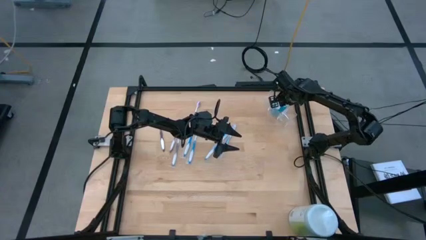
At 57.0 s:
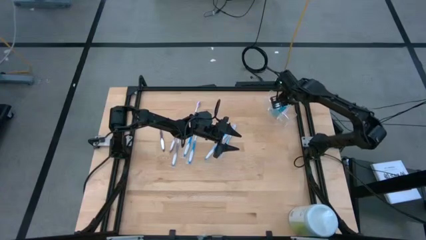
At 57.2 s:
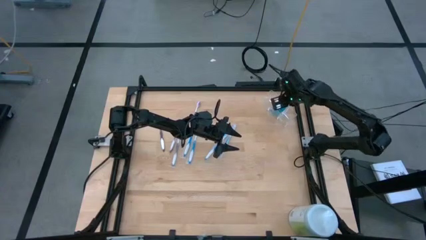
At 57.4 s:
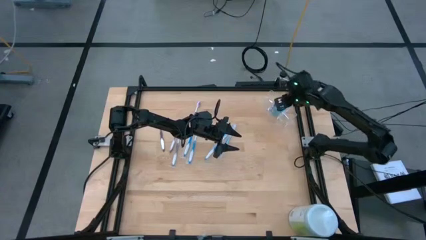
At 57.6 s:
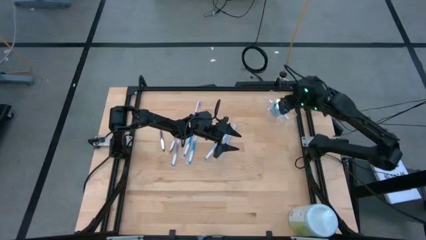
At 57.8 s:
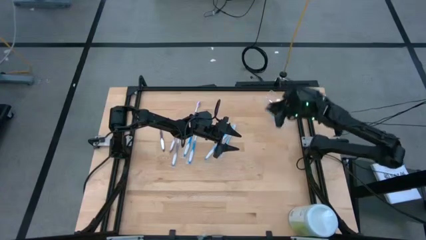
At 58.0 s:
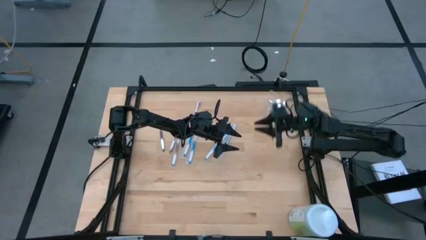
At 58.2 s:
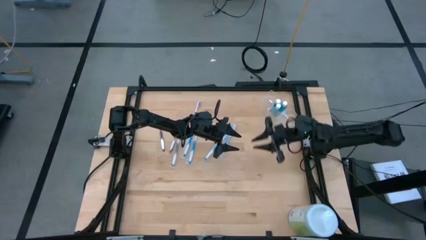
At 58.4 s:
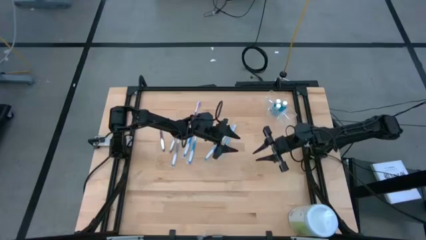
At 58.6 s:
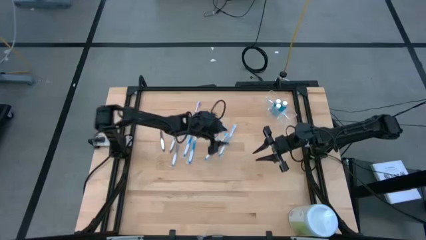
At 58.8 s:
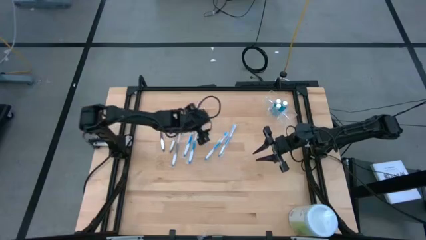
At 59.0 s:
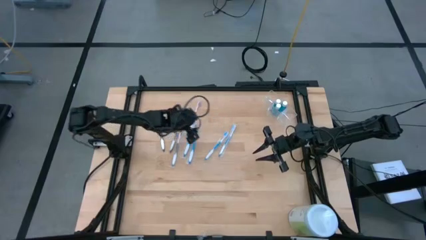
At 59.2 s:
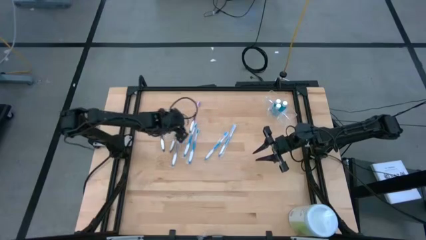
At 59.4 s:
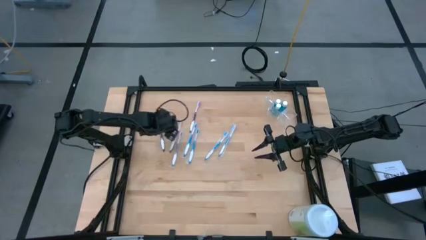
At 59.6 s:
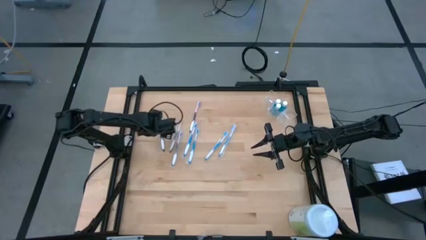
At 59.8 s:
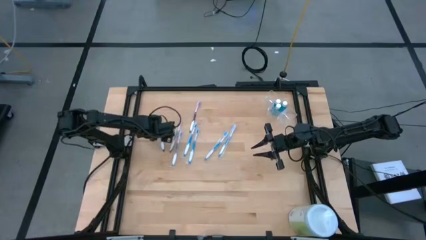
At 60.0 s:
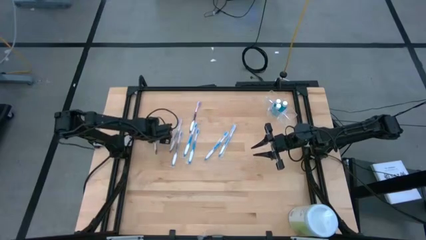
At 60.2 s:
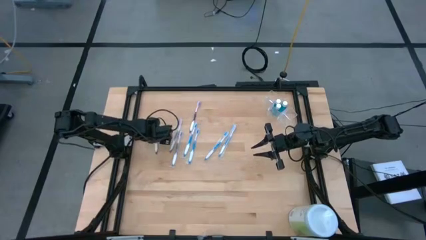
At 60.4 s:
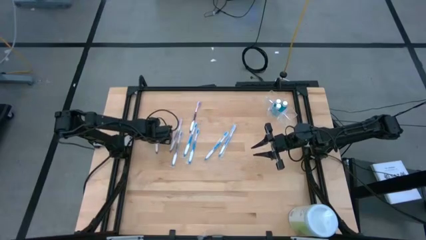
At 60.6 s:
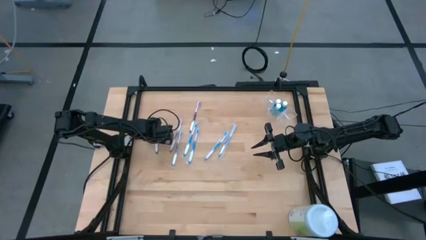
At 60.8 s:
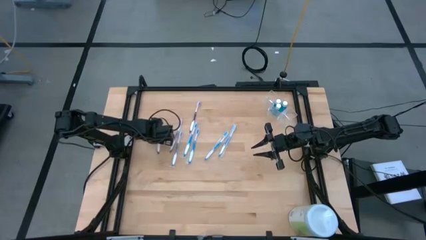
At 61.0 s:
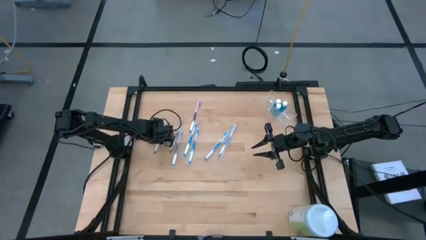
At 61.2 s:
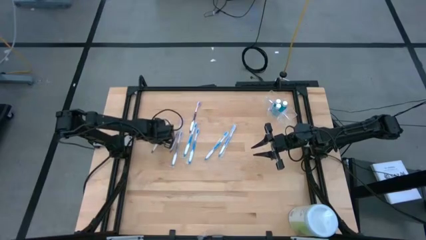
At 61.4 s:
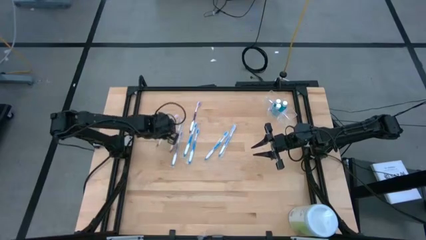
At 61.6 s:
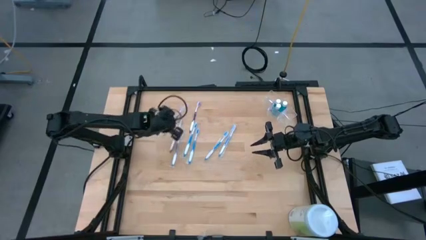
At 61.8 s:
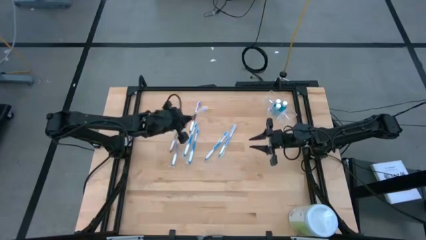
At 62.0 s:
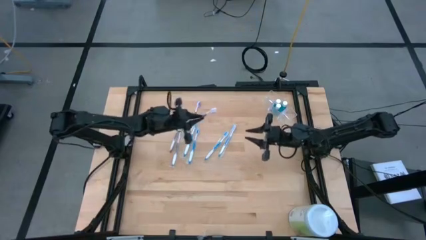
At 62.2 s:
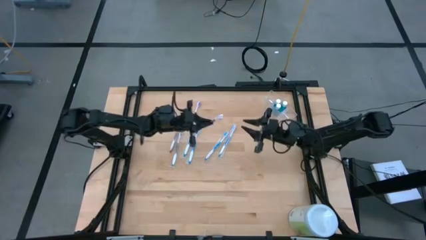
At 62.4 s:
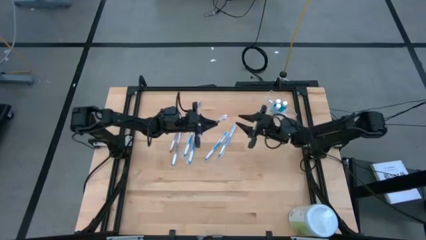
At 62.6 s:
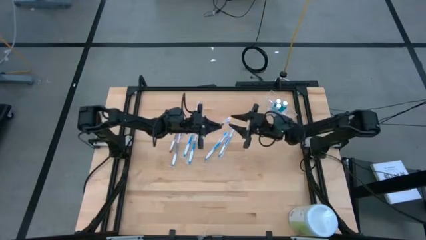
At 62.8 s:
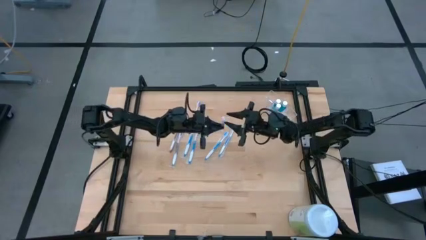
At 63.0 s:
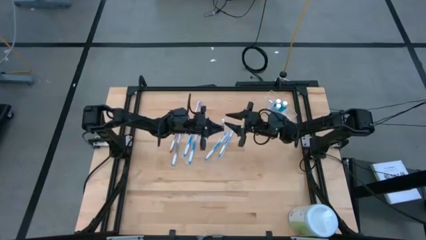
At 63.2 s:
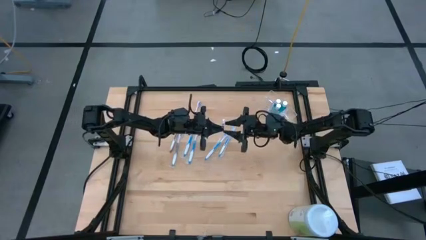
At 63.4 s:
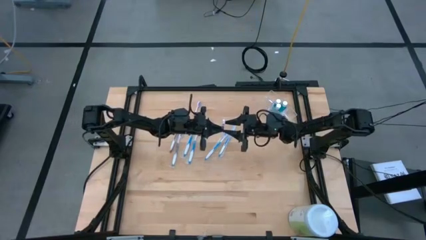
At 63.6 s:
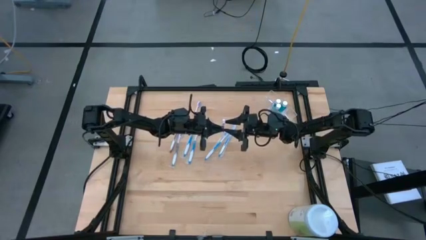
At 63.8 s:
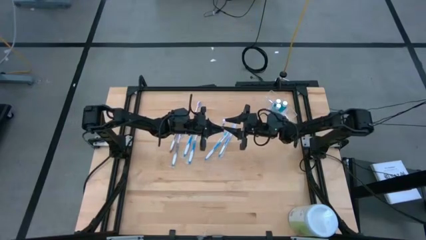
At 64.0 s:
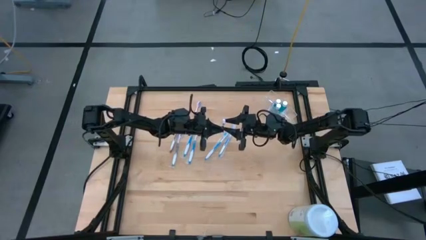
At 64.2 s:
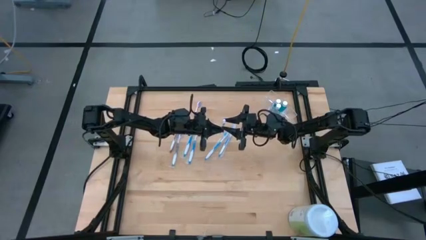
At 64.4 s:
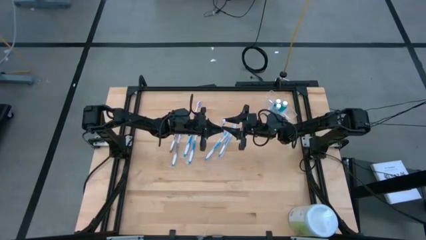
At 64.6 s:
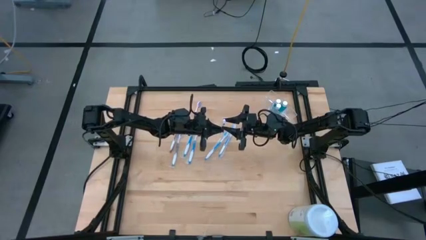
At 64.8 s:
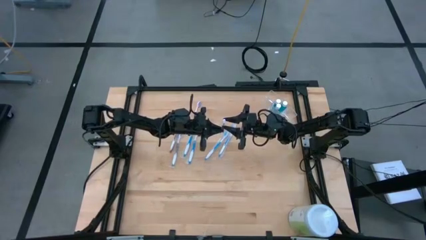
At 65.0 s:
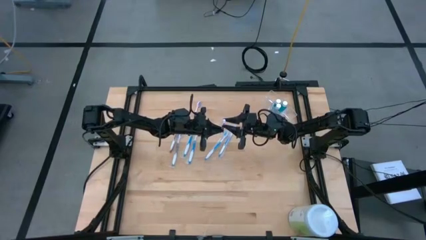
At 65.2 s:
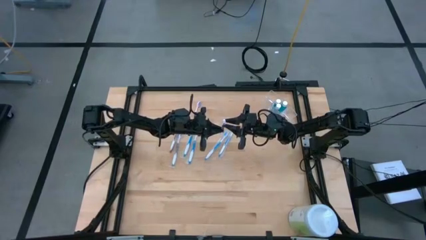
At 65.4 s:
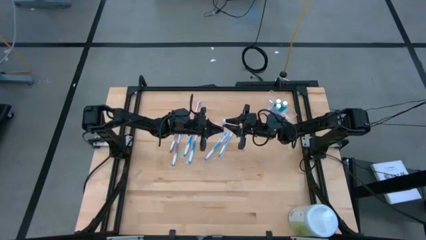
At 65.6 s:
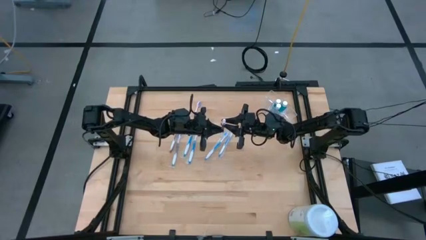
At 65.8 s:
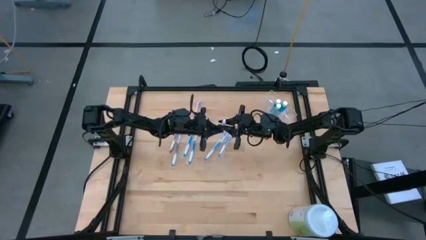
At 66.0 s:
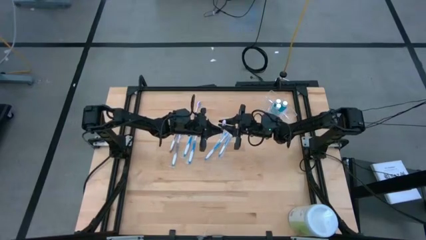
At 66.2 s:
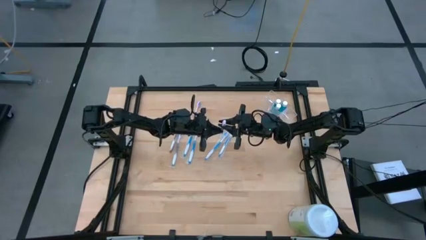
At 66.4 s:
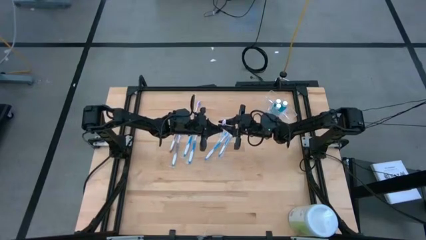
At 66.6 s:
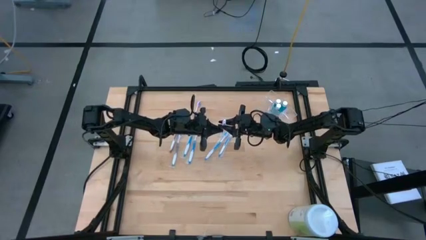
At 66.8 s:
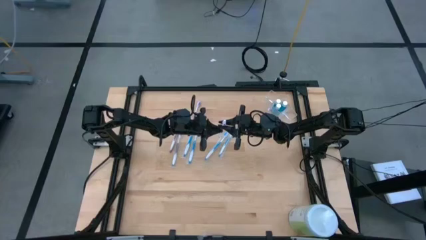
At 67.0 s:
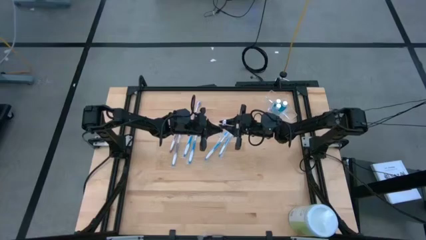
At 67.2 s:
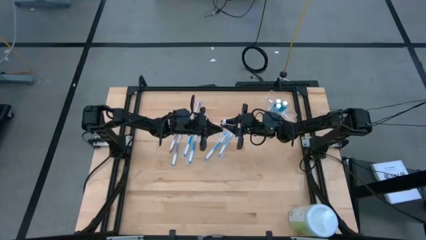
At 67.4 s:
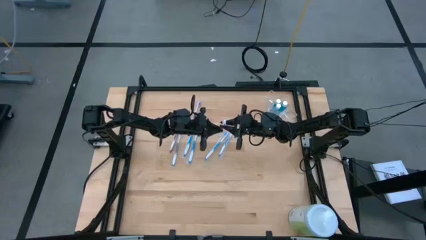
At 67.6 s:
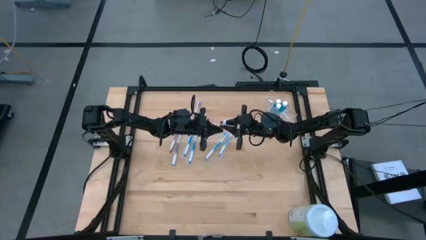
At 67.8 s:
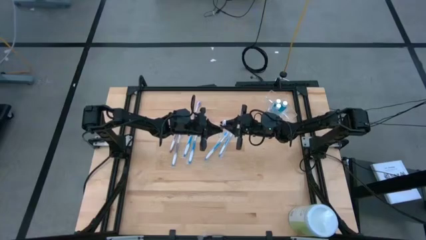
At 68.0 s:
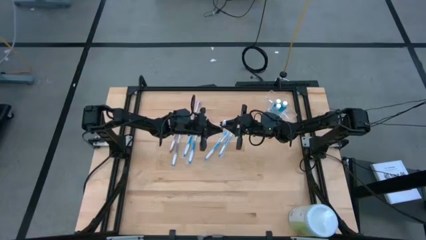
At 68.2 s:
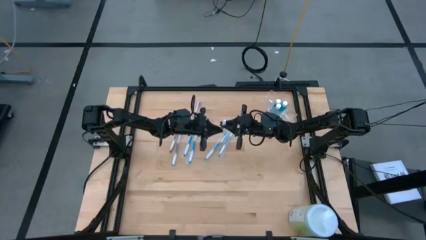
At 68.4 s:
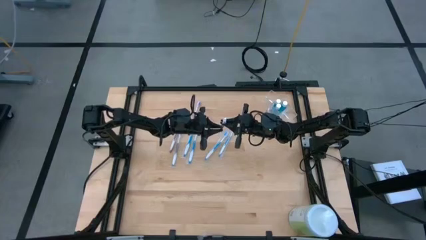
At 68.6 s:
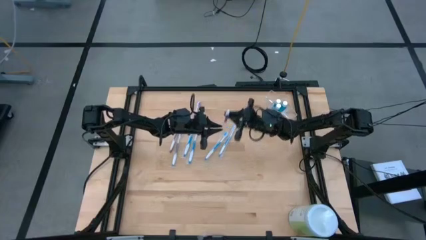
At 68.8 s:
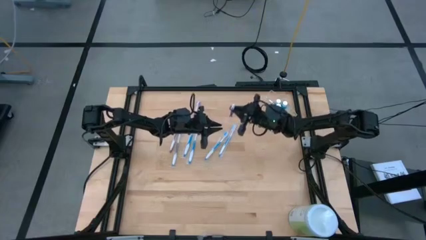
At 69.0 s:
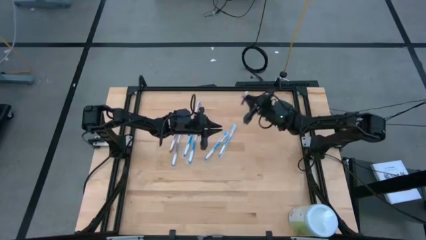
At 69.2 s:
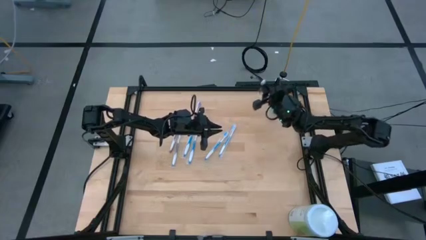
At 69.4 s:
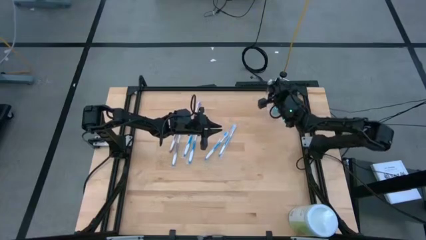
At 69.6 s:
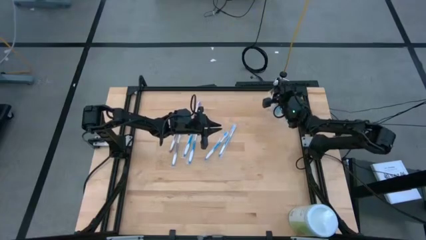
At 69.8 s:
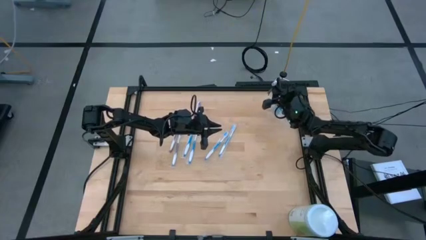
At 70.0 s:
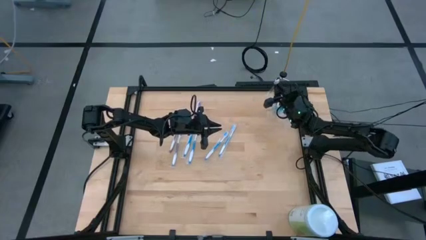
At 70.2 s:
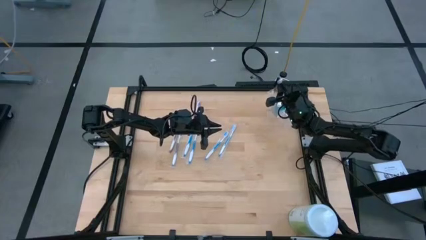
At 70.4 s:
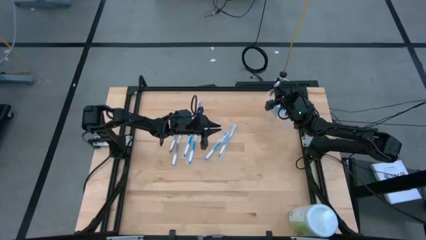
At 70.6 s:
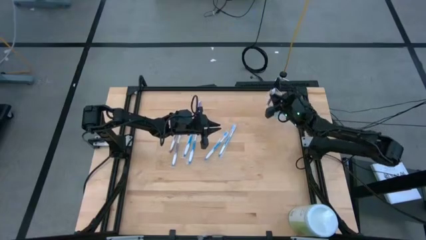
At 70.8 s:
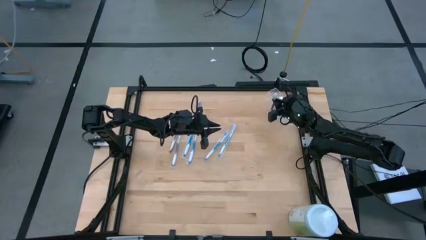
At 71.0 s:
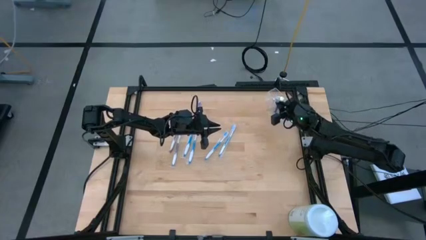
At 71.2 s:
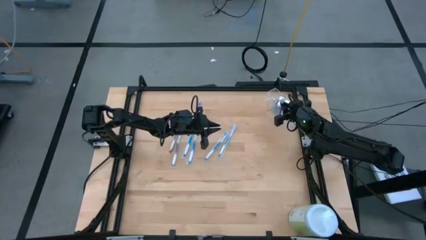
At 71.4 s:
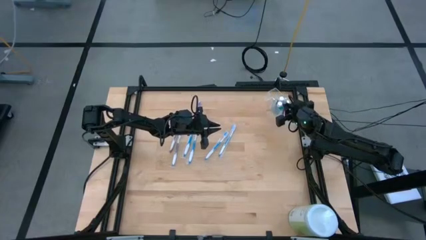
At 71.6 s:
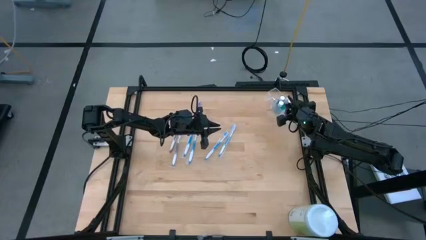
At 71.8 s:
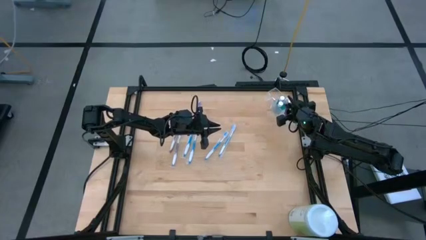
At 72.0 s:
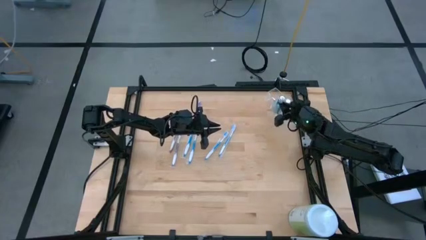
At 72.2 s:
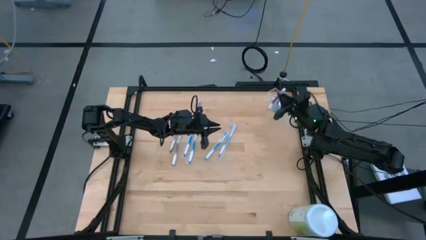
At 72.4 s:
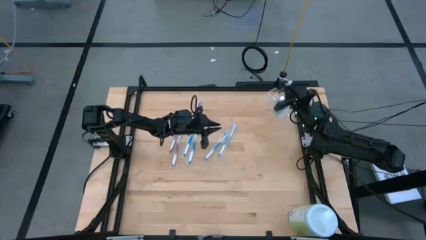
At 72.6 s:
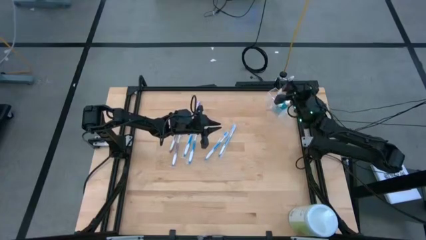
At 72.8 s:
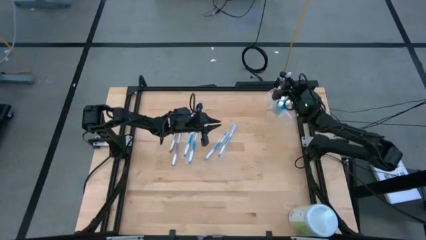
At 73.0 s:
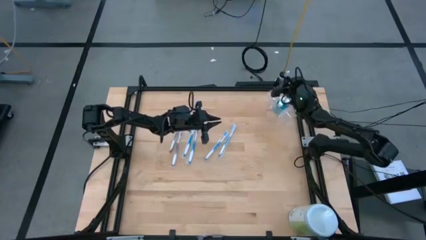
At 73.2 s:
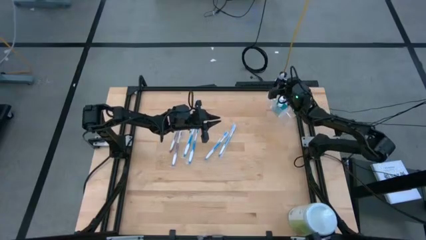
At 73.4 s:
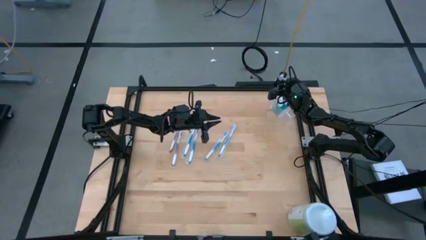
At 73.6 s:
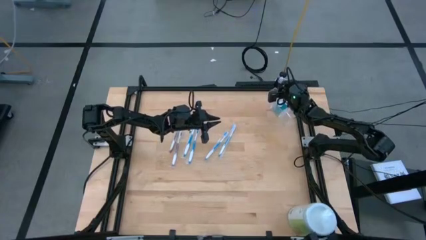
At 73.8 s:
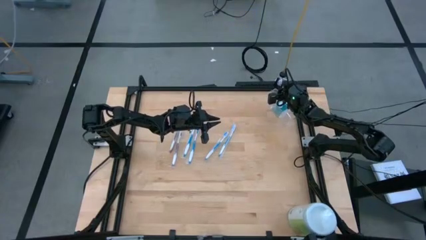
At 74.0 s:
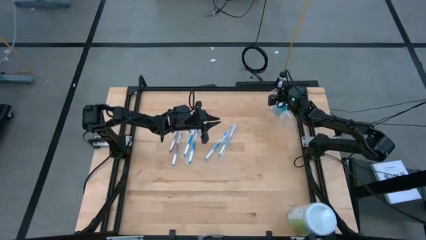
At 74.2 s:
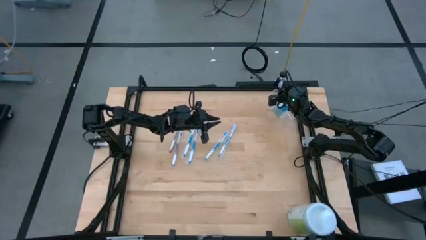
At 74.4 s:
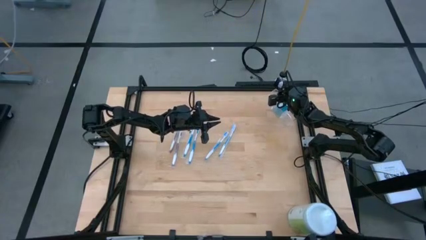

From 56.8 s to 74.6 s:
Task: Pick & Place toothbrushing station
Put the violet toothbrush into the left of the transparent organizer
